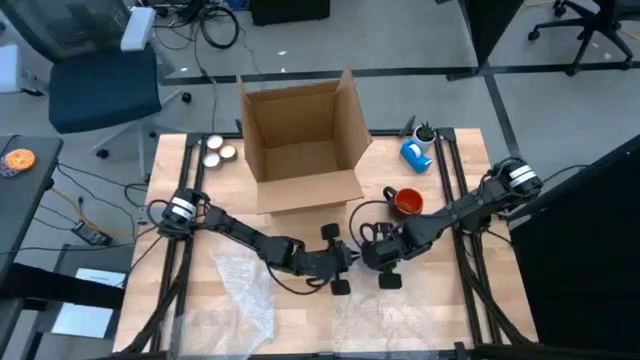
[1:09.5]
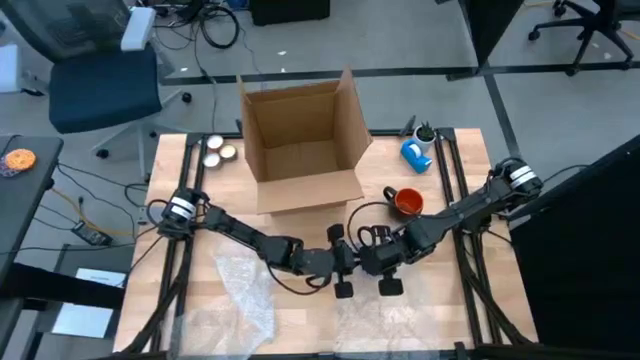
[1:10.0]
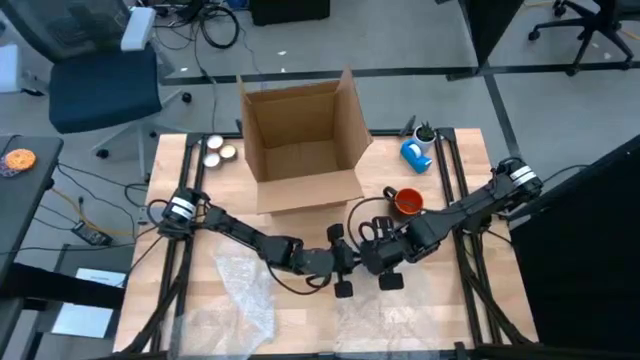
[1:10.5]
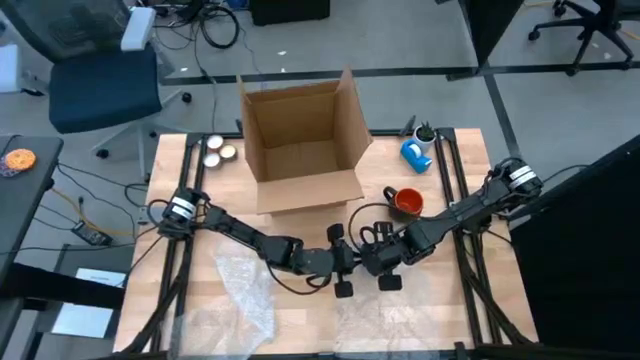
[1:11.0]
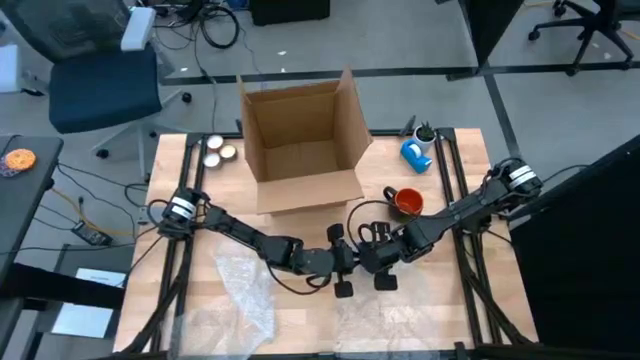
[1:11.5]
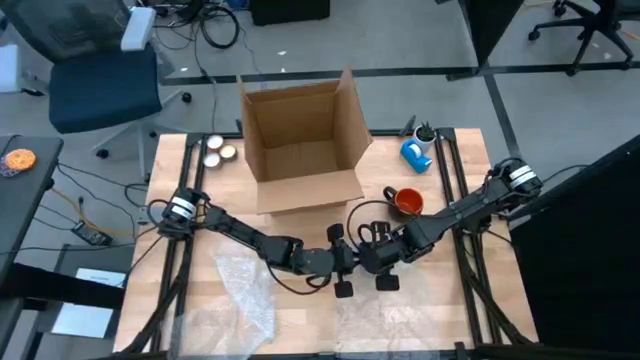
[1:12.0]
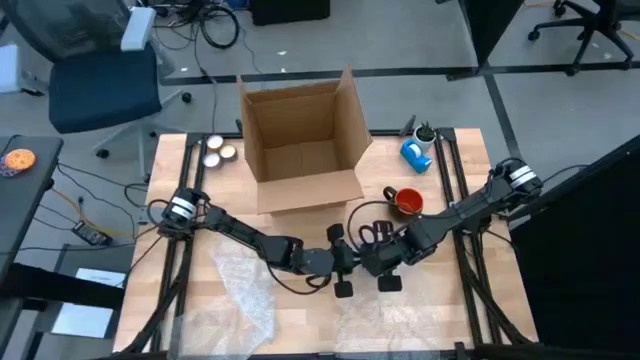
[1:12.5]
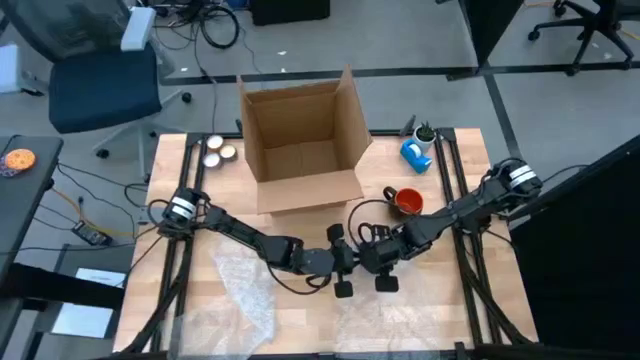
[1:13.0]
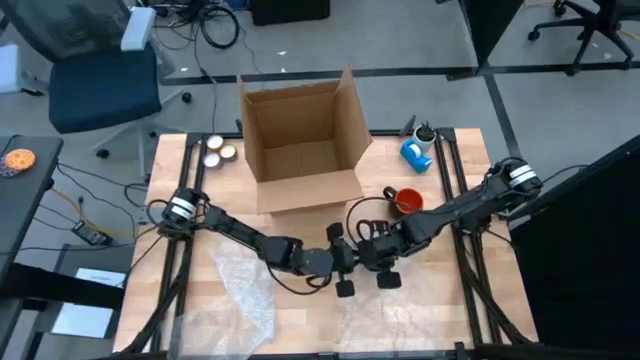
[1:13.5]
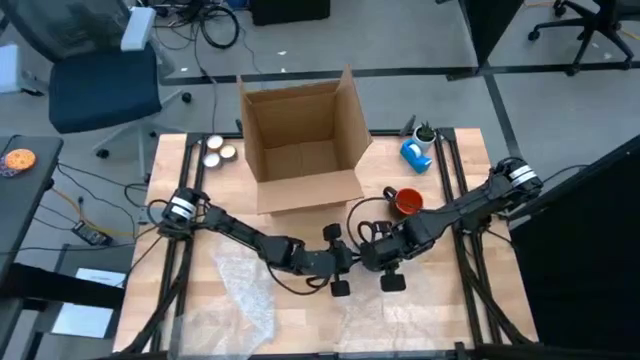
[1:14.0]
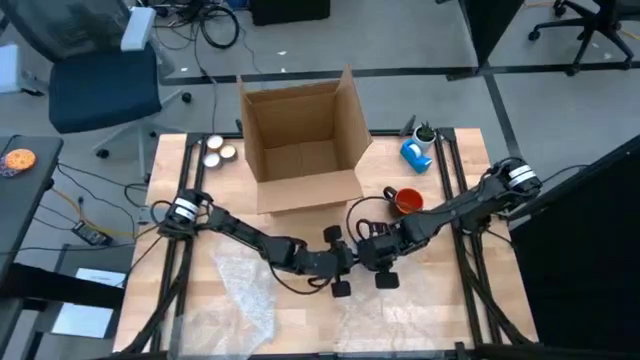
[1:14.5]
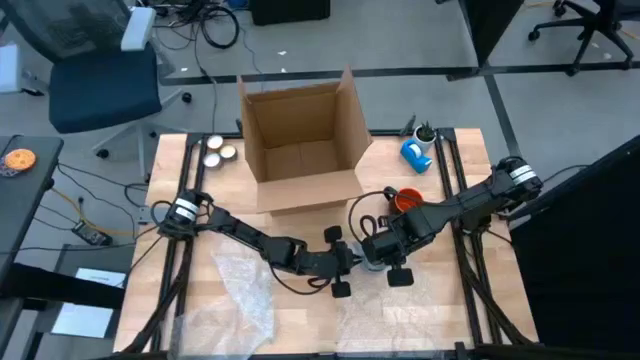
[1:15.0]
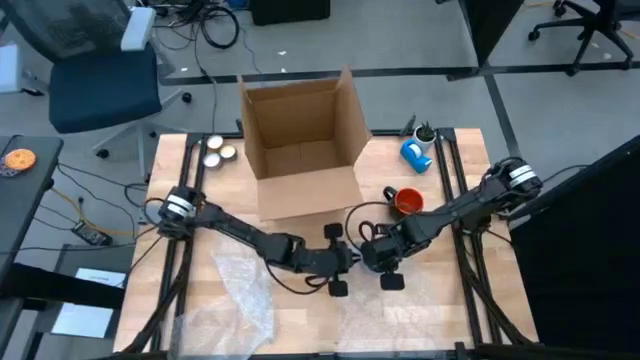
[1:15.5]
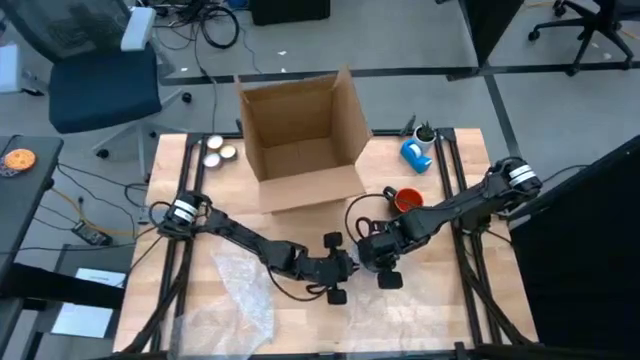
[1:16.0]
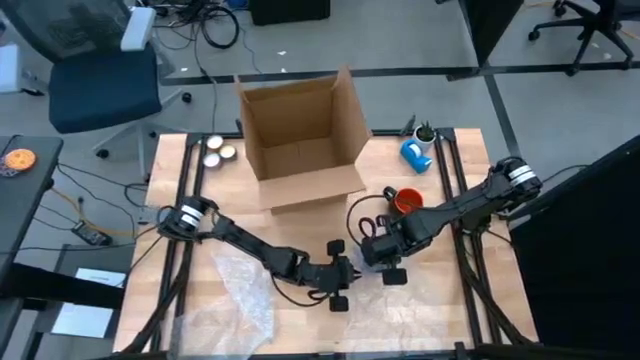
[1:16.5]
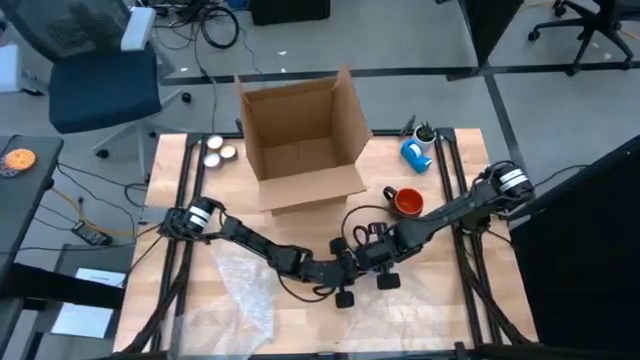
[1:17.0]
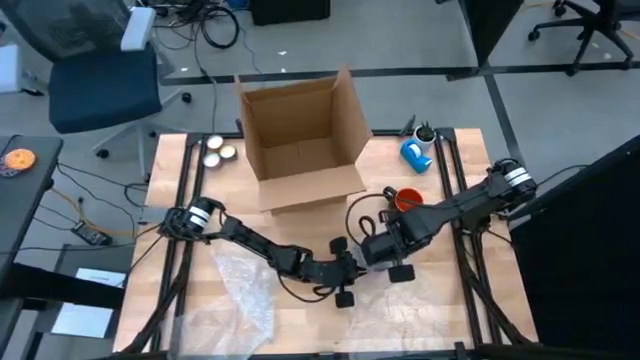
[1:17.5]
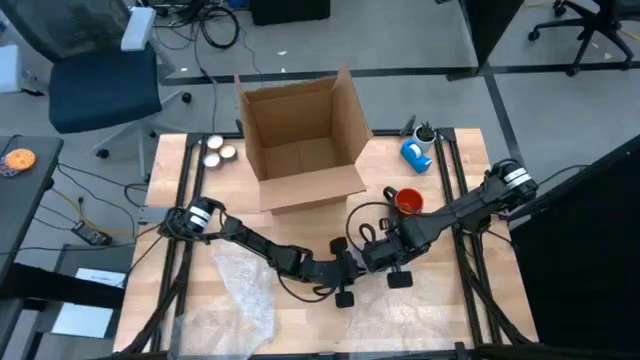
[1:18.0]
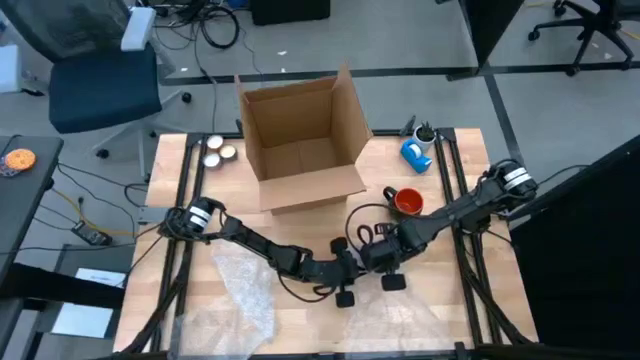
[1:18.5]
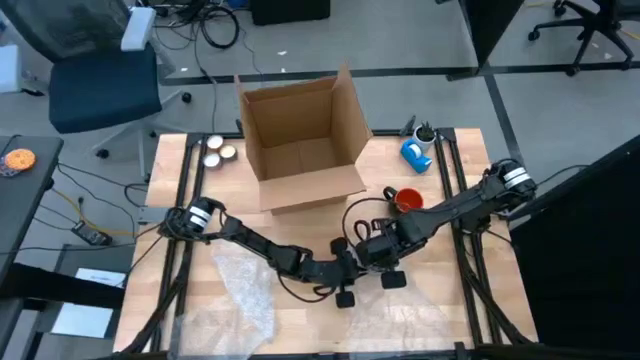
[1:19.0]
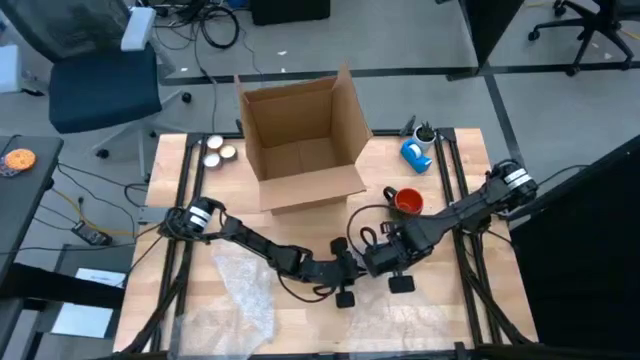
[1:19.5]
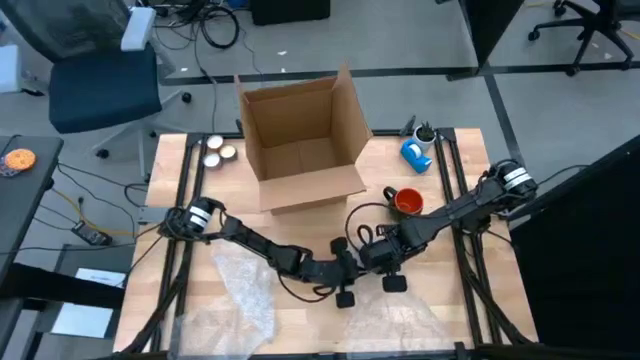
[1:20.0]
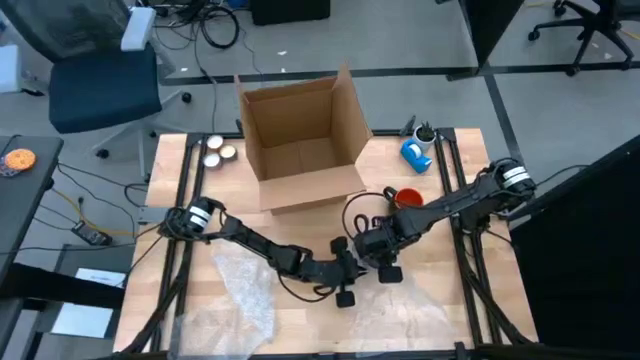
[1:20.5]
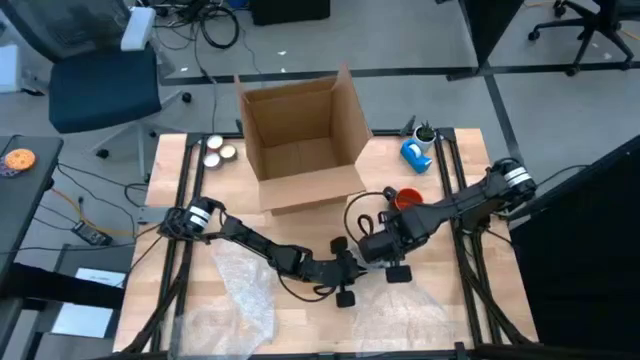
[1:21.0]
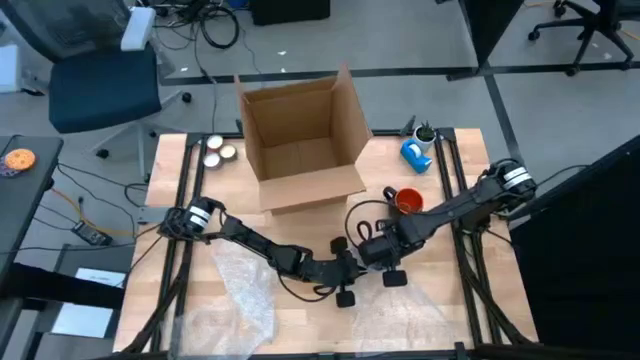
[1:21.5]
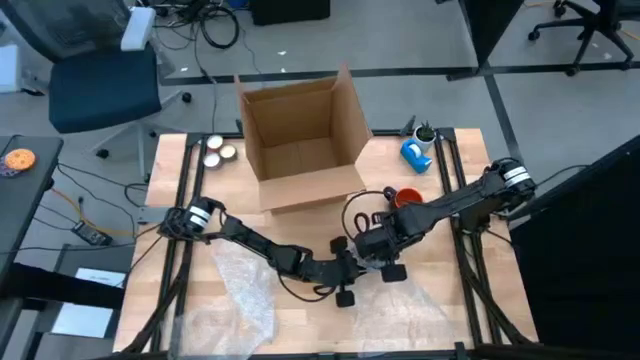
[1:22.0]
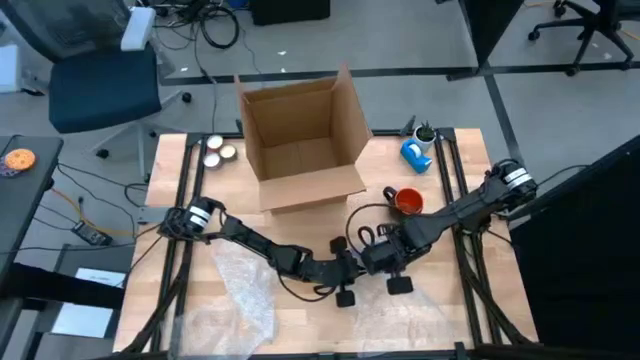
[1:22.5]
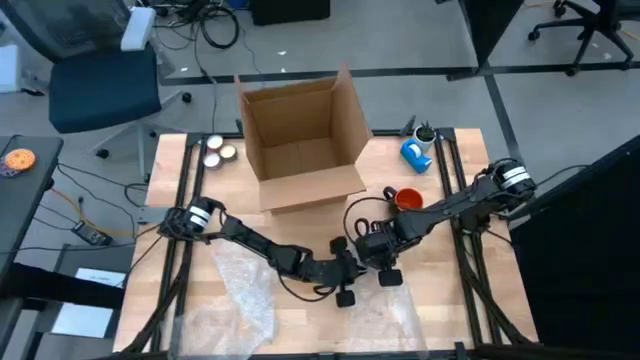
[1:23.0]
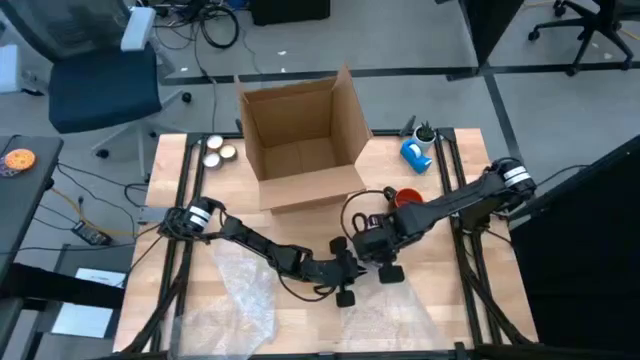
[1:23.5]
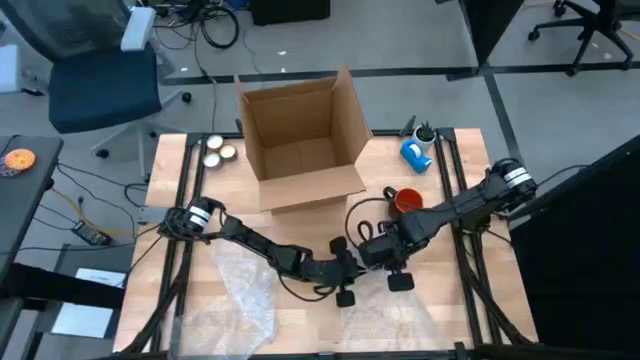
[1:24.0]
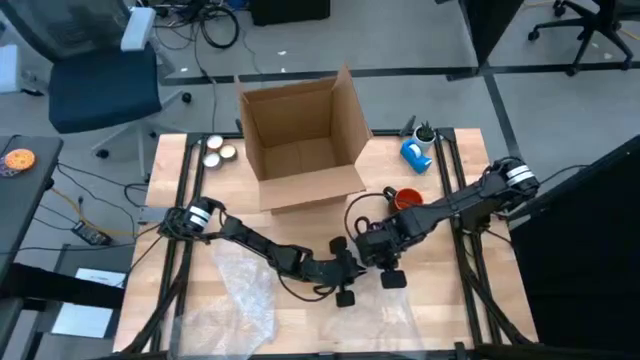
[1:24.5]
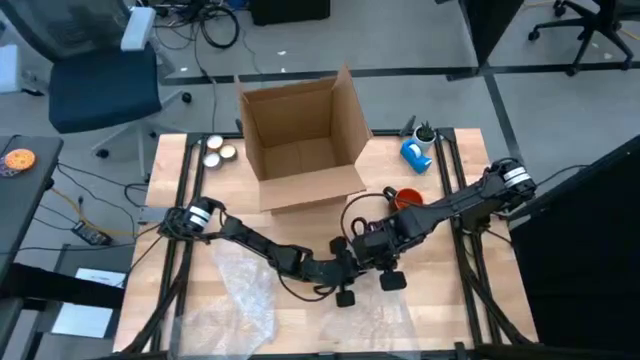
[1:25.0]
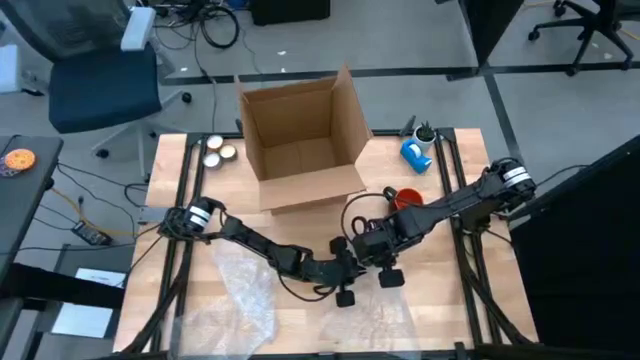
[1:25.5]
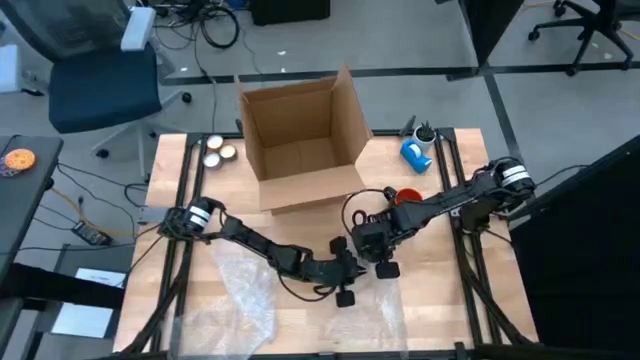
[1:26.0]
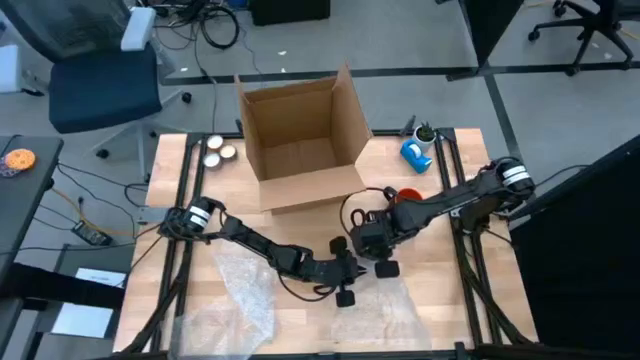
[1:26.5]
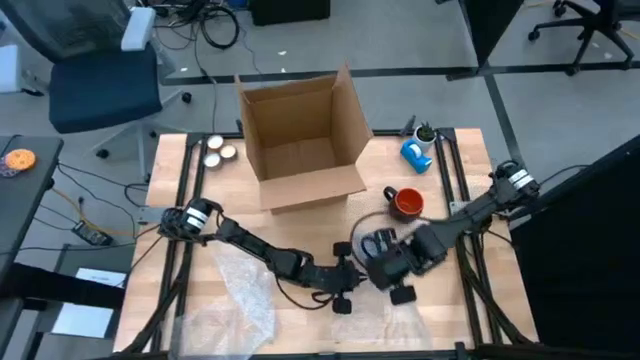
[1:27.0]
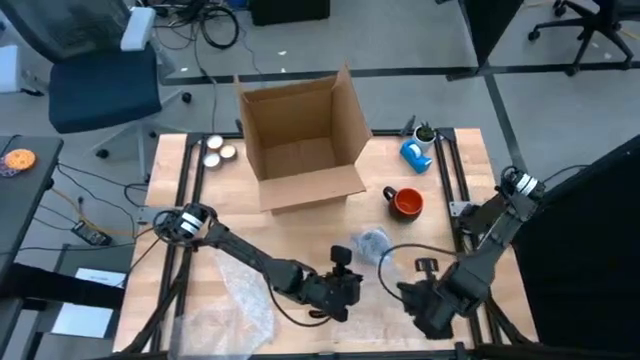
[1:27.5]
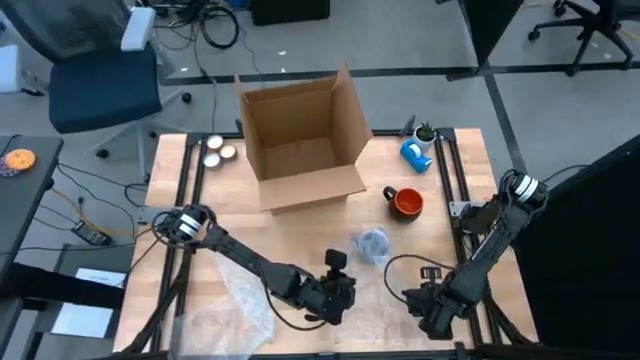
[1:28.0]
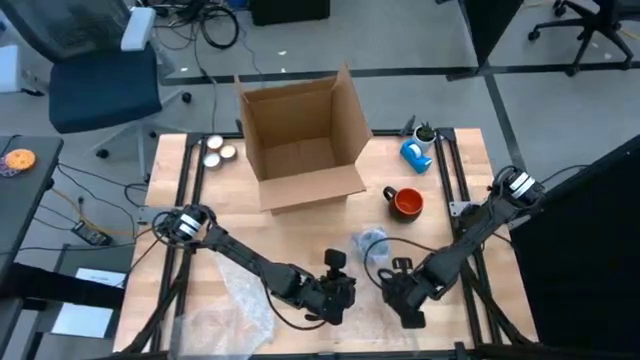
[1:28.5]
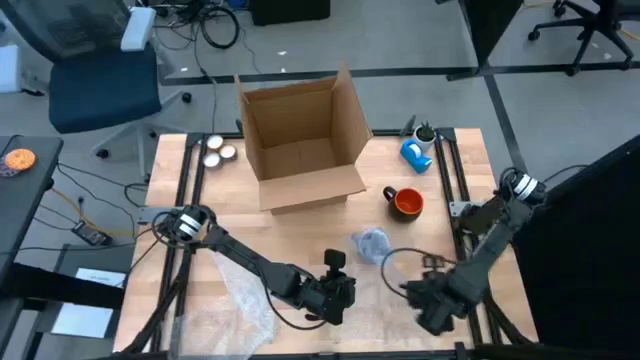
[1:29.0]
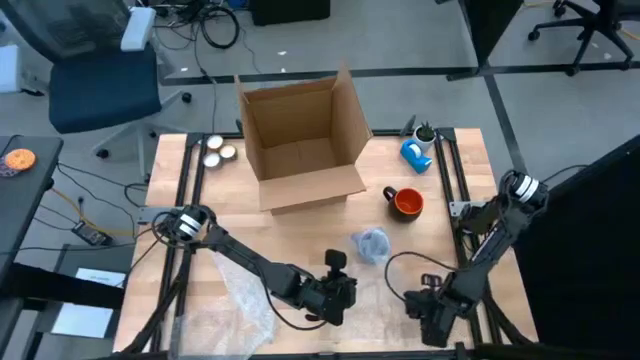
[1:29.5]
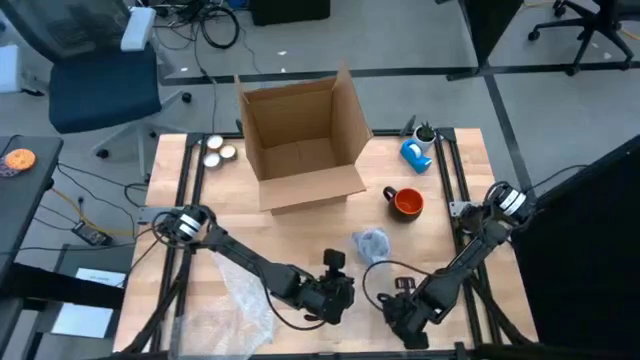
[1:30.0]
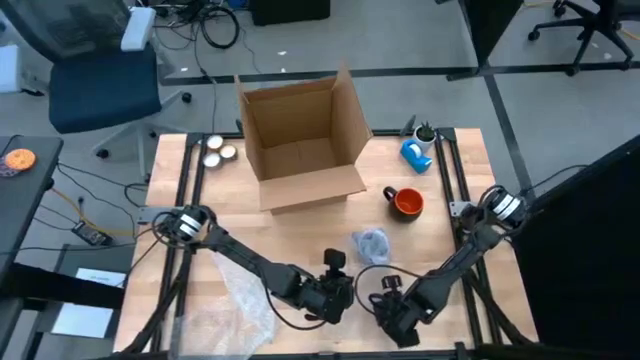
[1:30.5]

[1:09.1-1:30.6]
Task: wrap mug
Wrap the blue mug with the top bubble wrap
